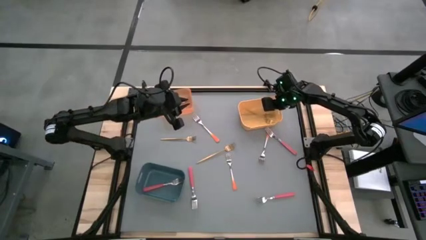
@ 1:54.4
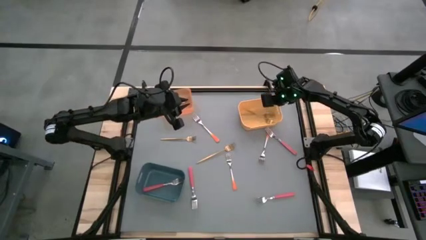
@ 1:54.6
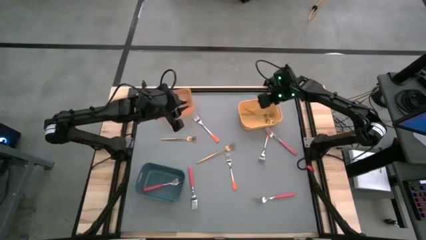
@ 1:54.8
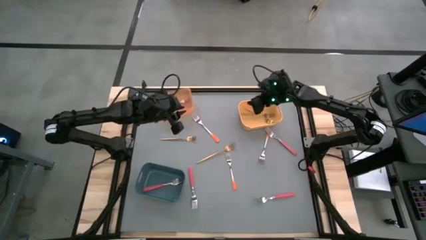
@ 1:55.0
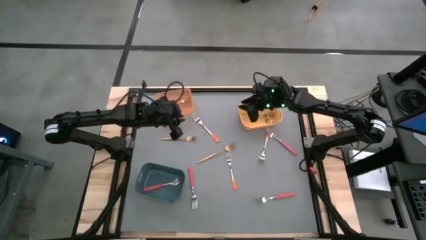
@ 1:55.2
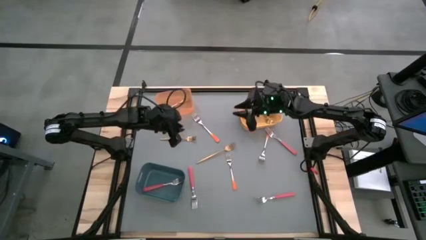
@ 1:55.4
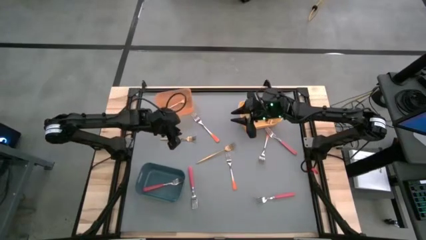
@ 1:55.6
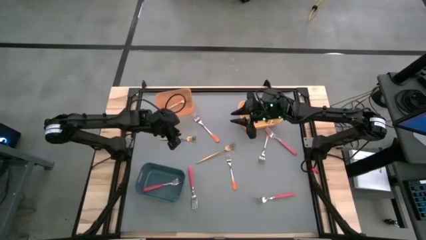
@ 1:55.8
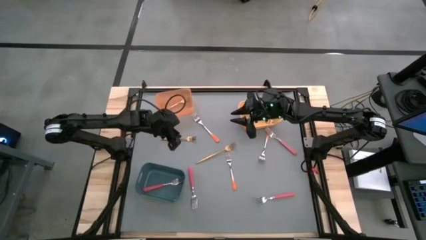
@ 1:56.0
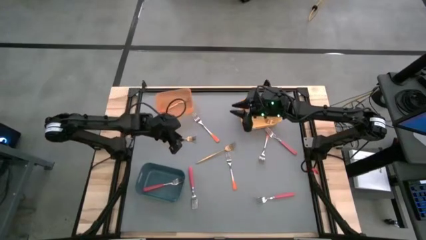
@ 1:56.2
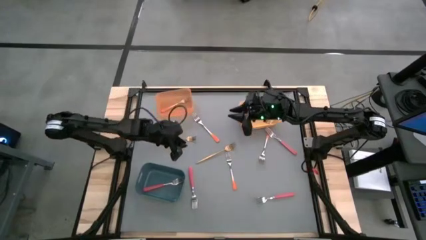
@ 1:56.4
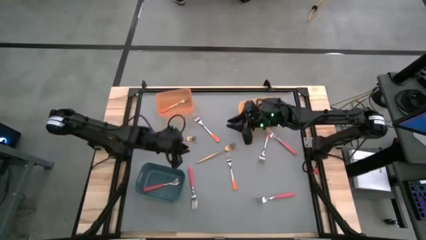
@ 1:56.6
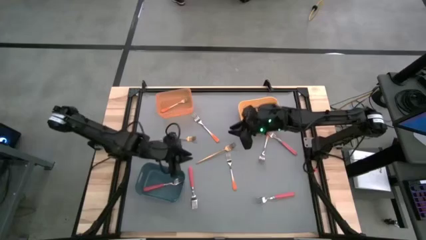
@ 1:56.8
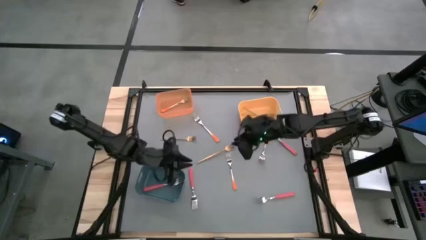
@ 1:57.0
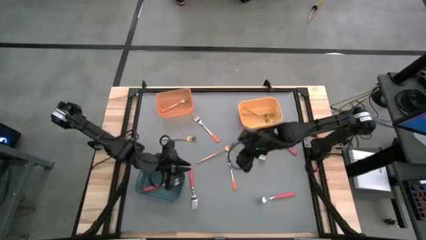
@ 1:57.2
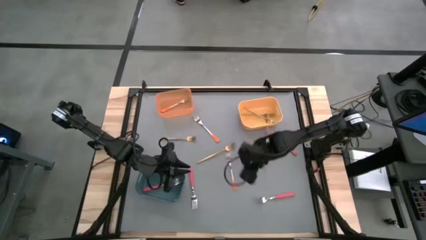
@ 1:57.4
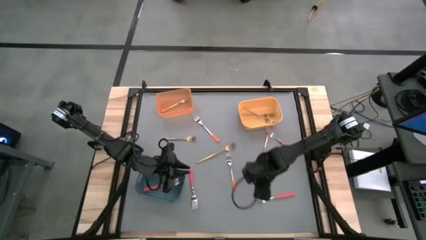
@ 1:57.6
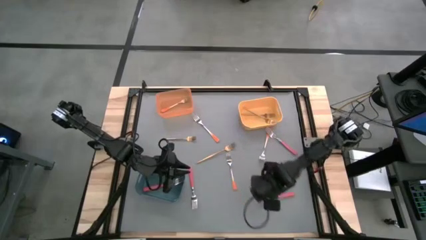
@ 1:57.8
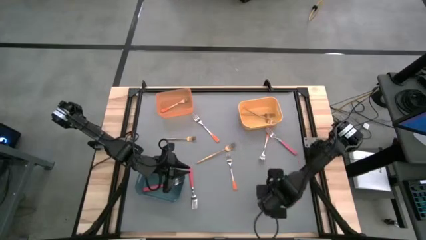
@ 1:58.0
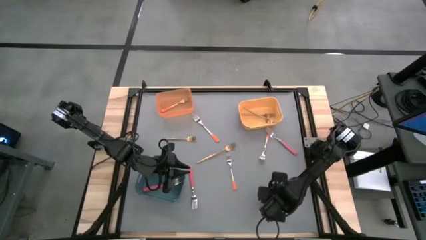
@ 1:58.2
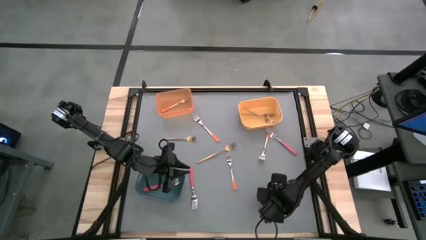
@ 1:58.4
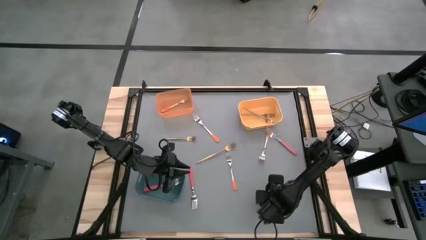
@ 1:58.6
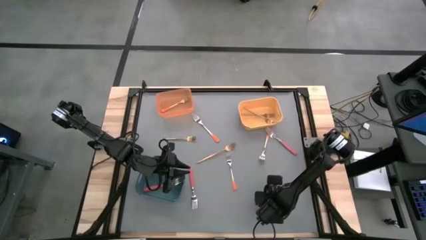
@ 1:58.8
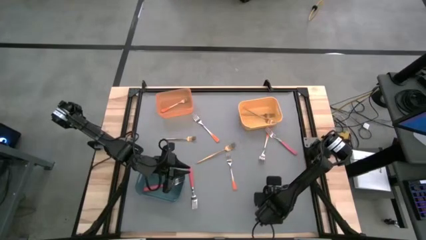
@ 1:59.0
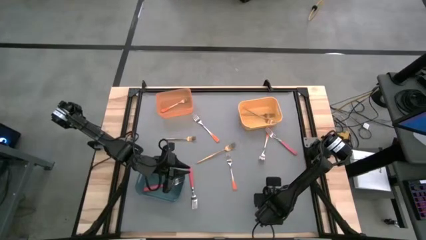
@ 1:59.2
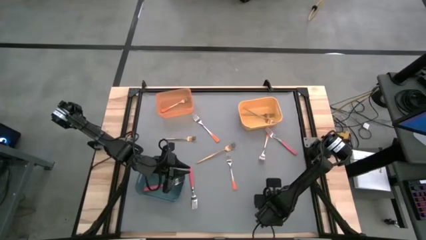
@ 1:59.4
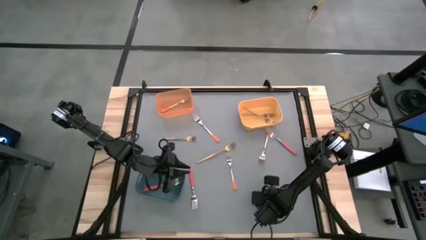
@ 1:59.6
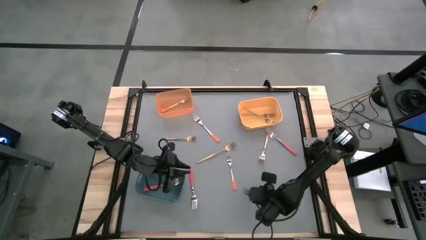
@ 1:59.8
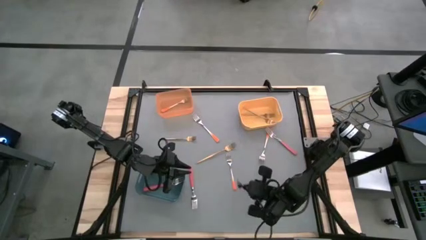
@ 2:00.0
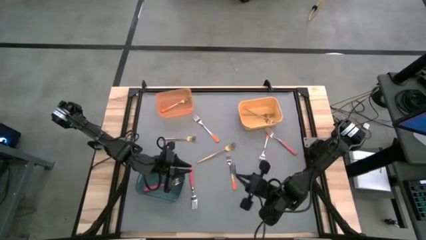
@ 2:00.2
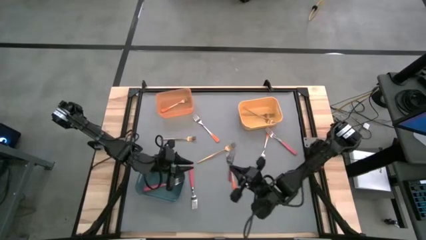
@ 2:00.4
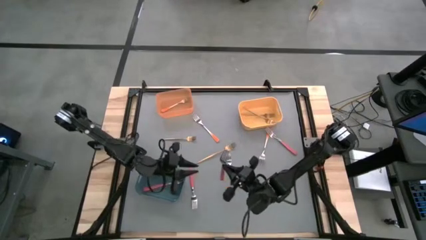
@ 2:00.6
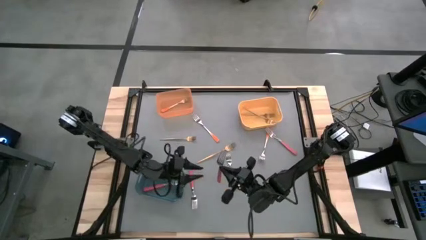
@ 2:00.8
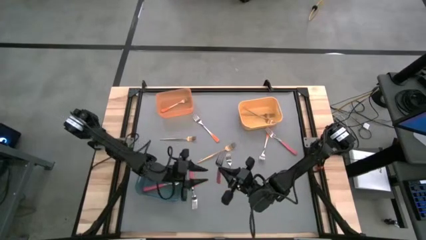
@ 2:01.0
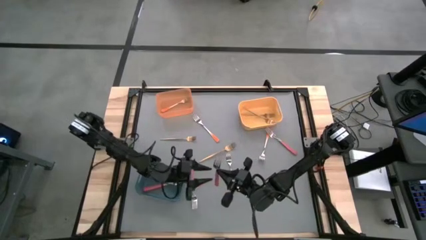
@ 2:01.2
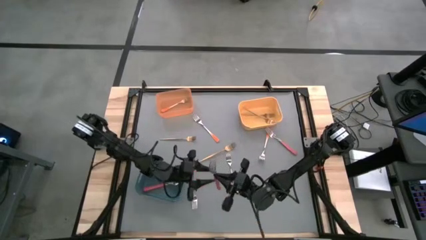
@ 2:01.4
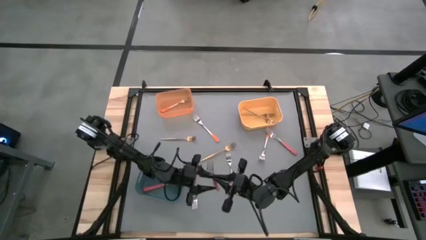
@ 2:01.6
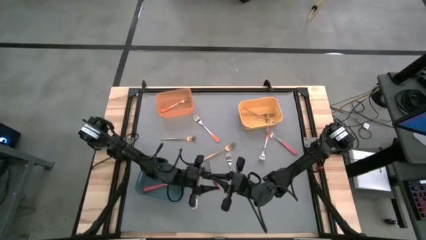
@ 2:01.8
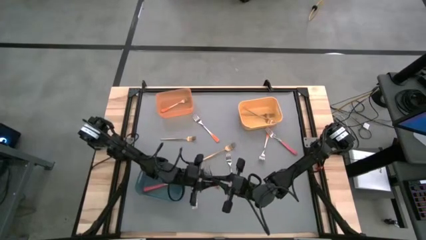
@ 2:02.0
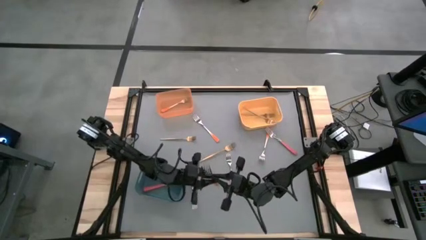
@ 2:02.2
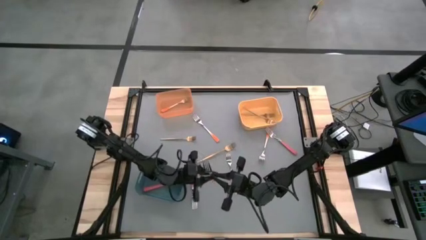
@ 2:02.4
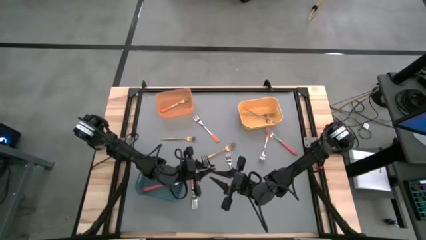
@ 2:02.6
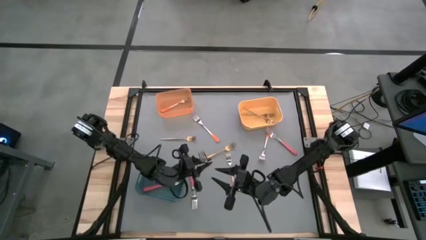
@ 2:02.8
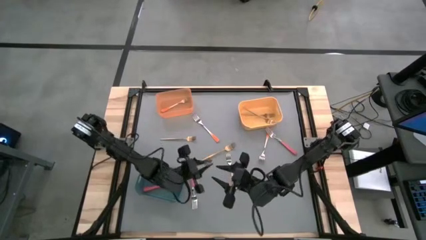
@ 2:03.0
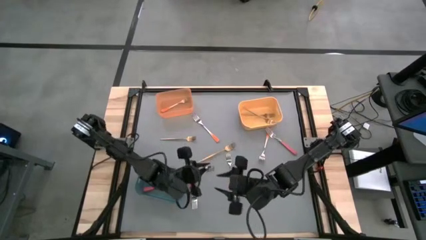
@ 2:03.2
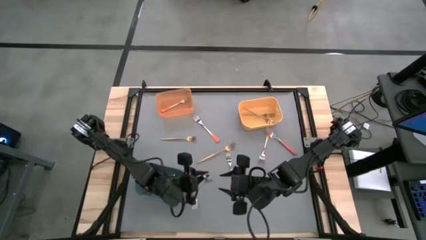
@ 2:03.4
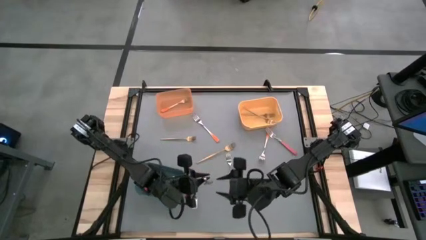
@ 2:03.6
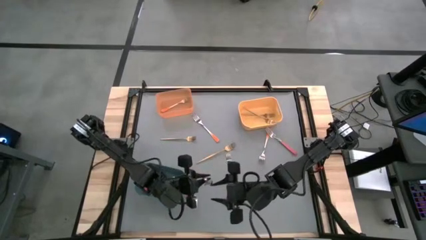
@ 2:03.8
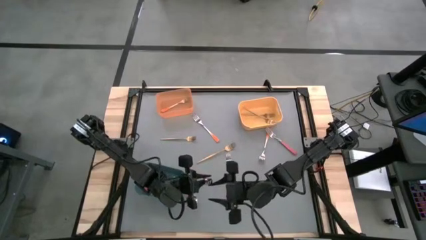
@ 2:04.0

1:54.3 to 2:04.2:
Task: Sort silverware by color (type)
Put the pink fork into the blue bin
